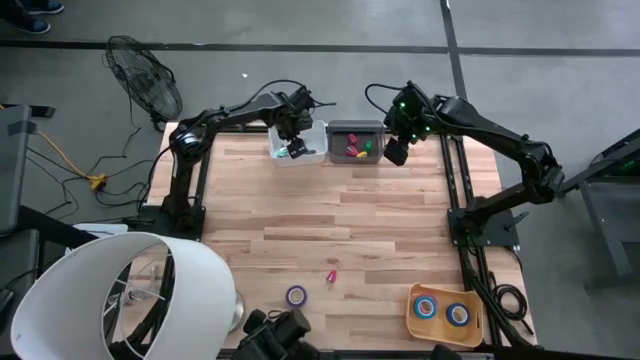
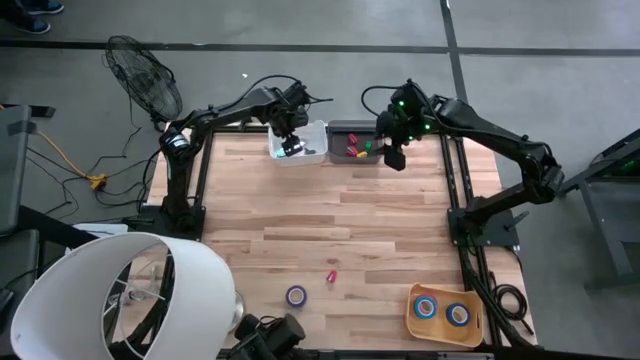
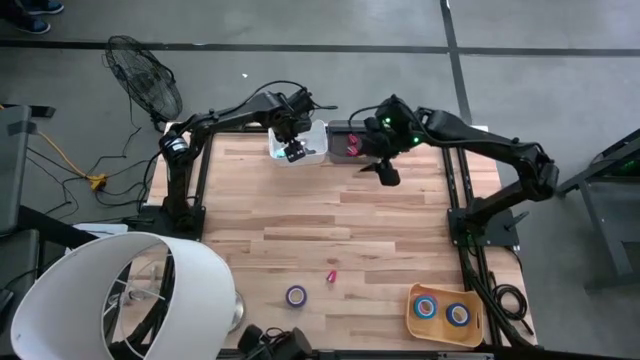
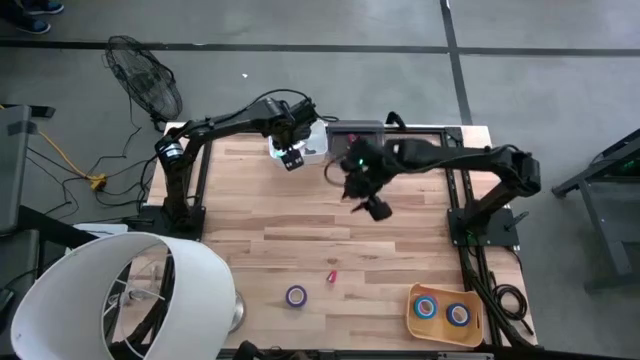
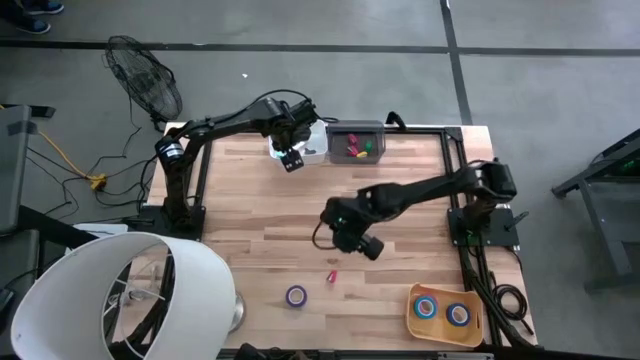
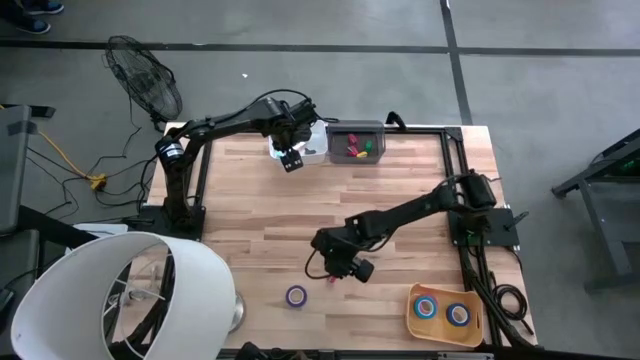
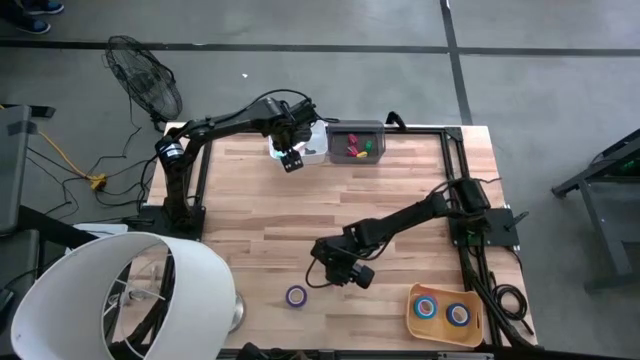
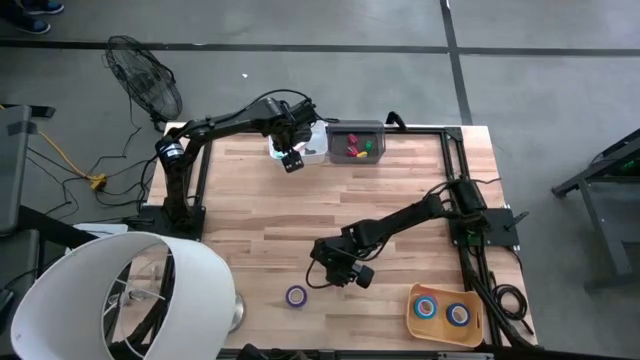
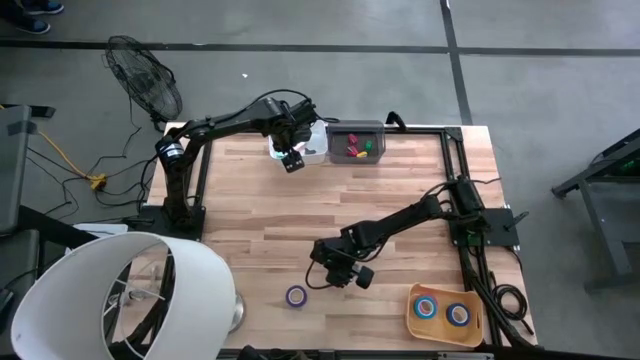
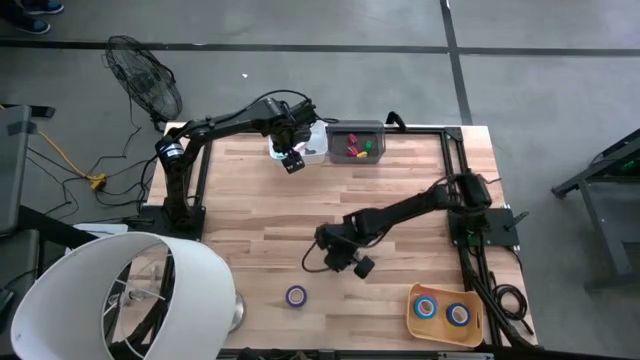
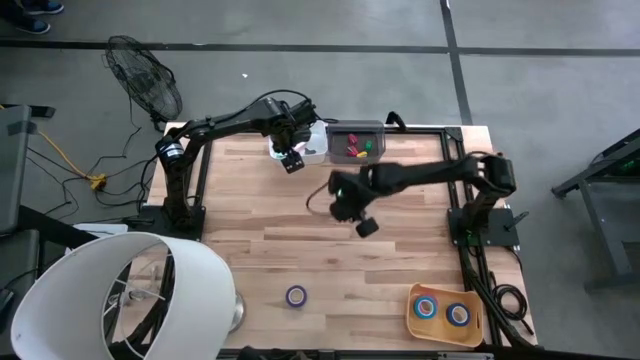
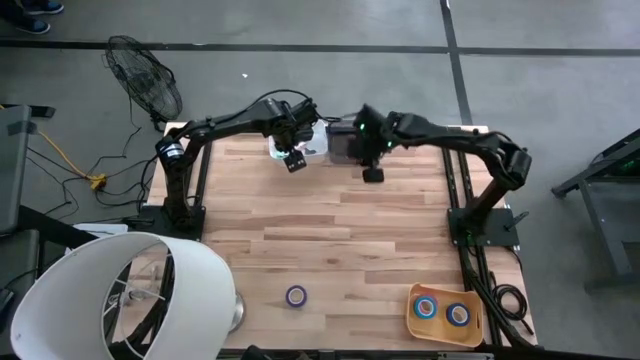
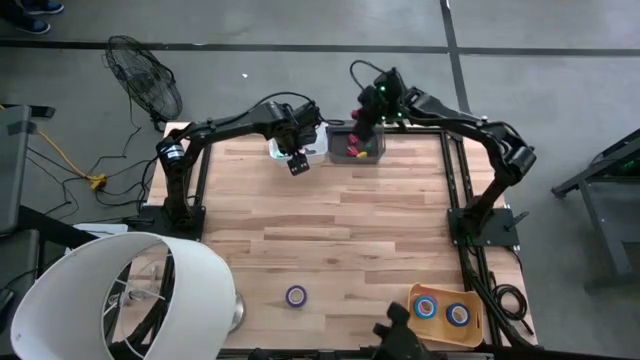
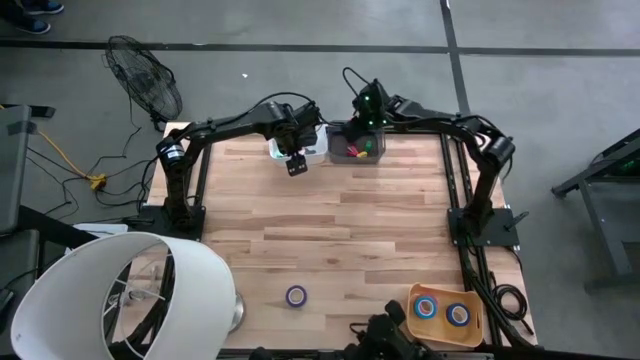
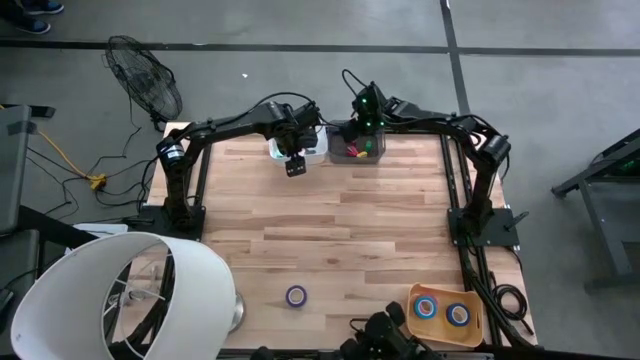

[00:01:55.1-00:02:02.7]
Task: Pick and place Stapler, Stapler remover, tape
Put the red stapler into the black bin

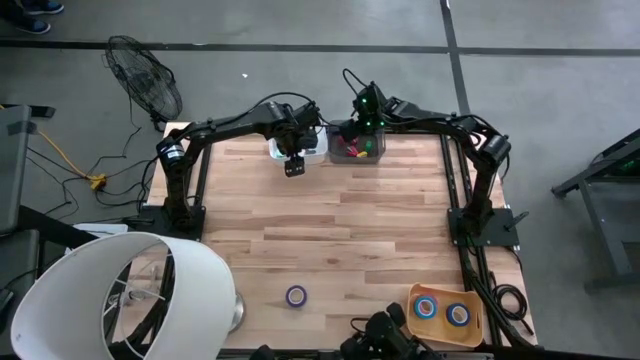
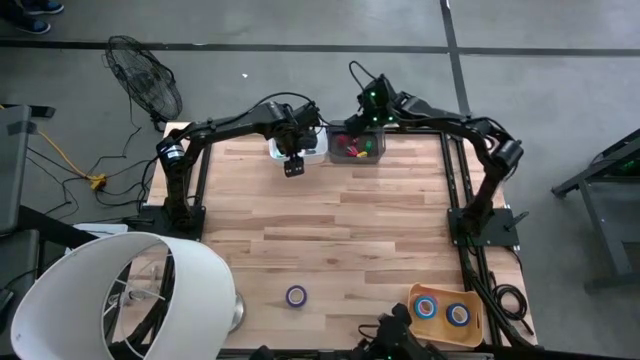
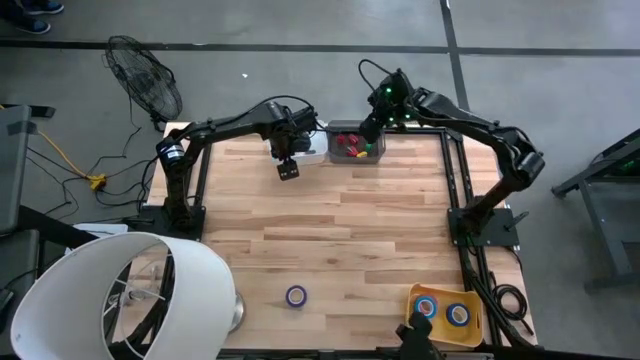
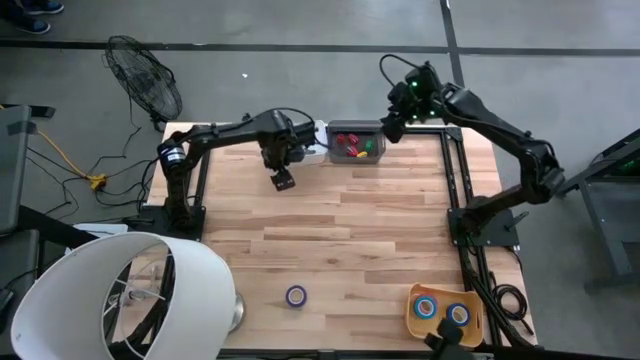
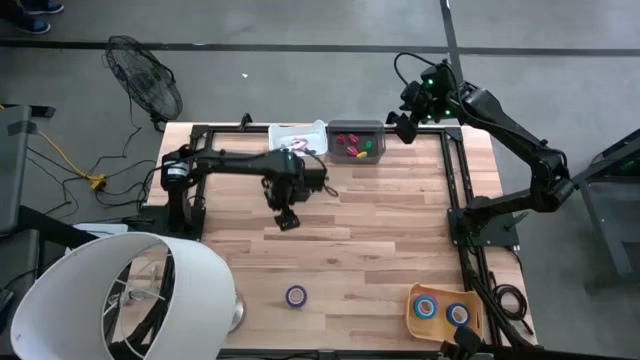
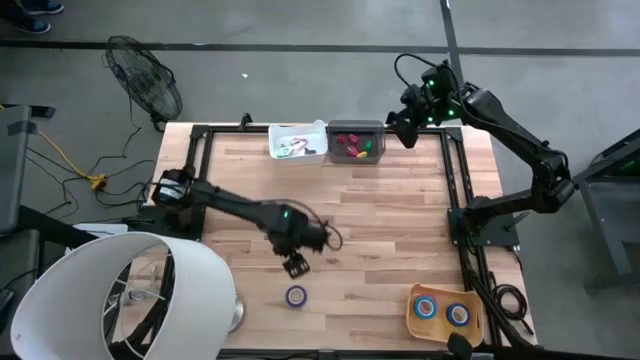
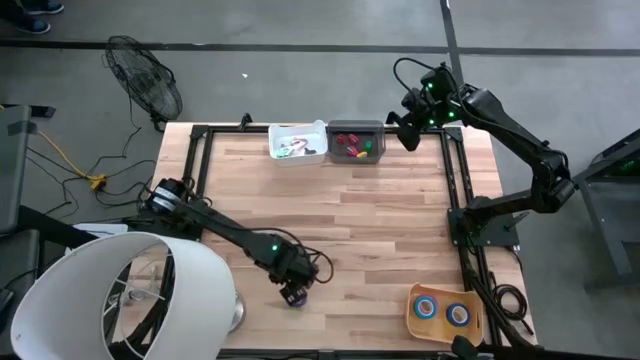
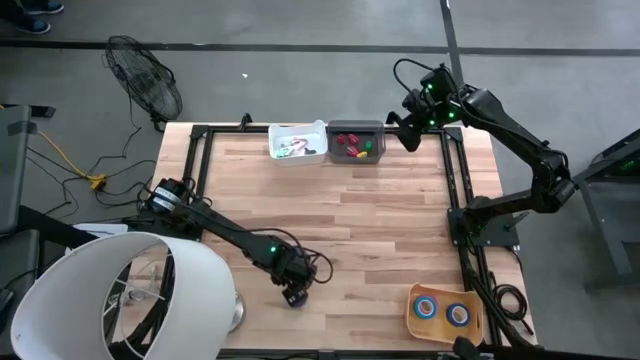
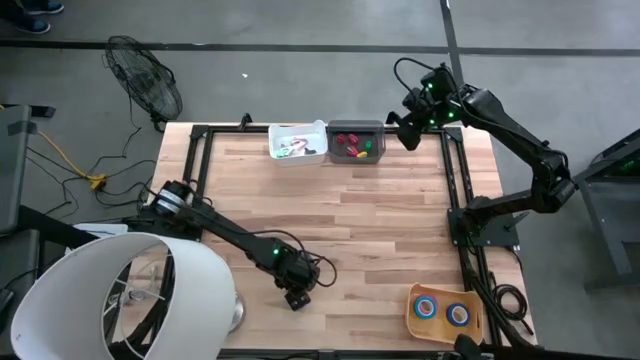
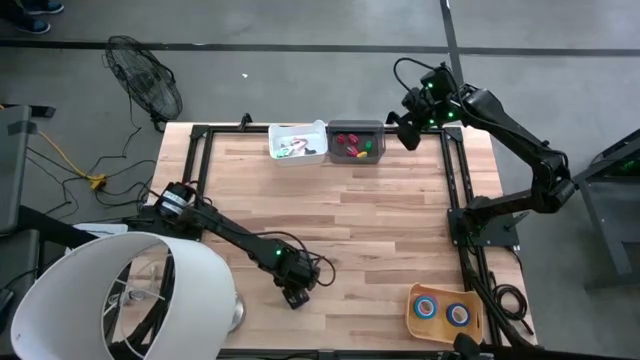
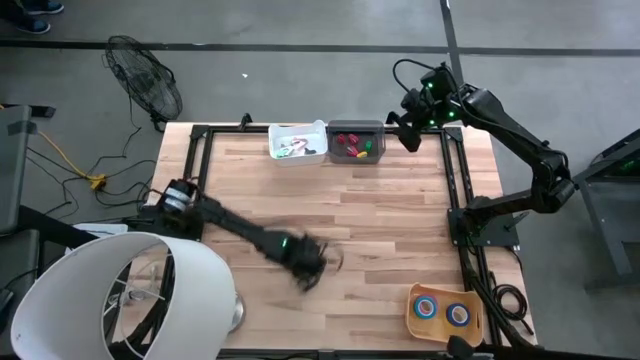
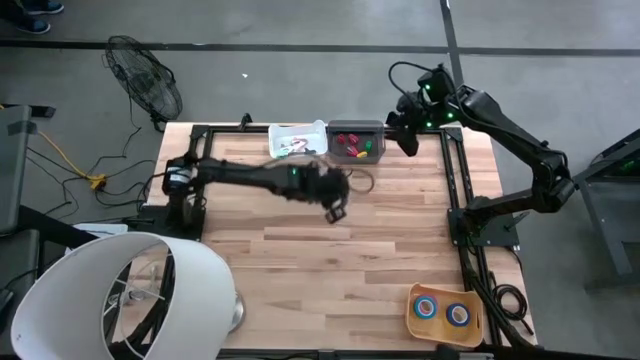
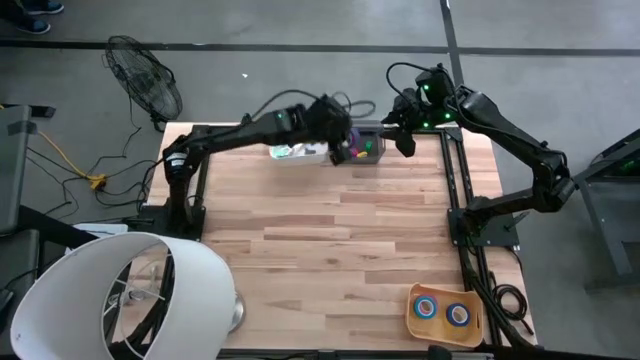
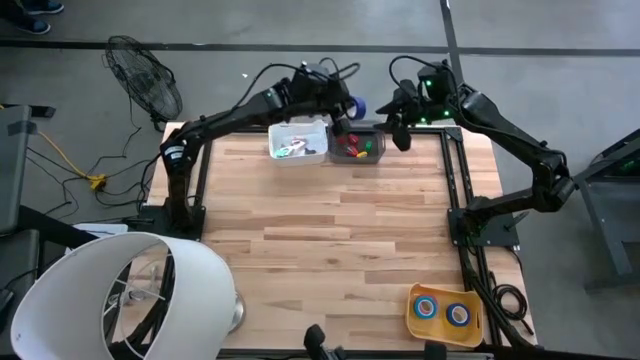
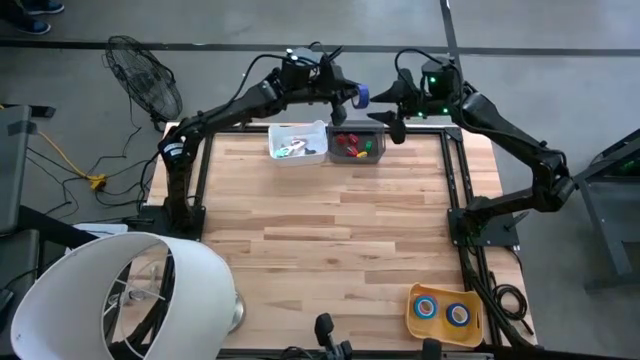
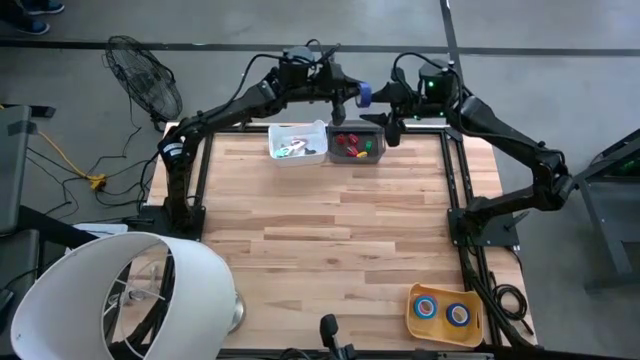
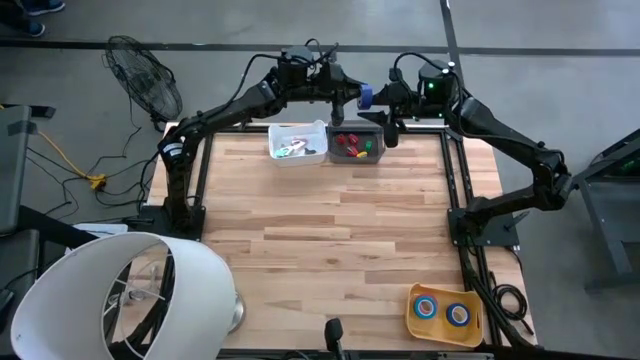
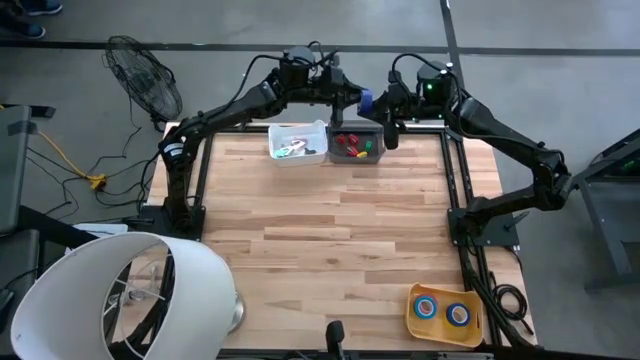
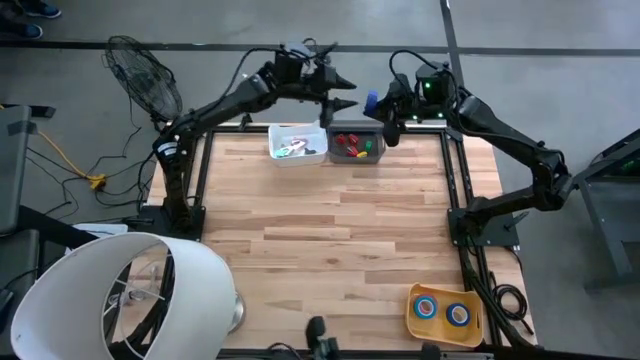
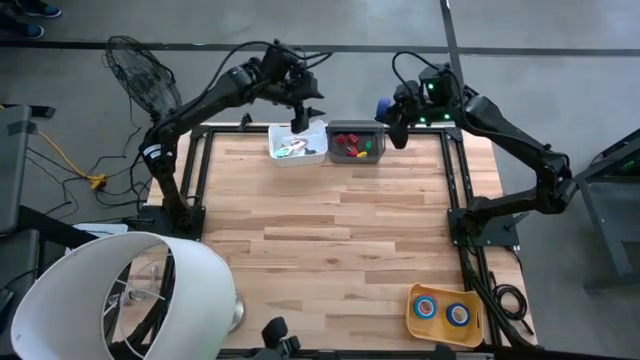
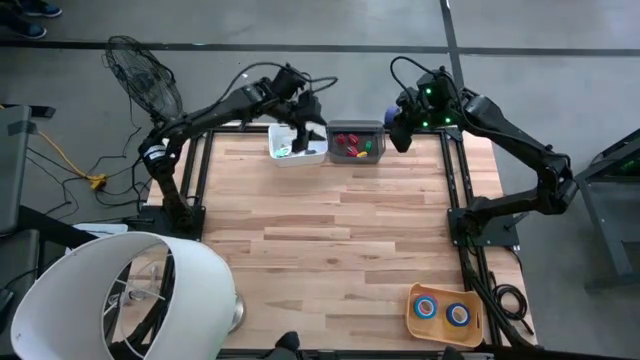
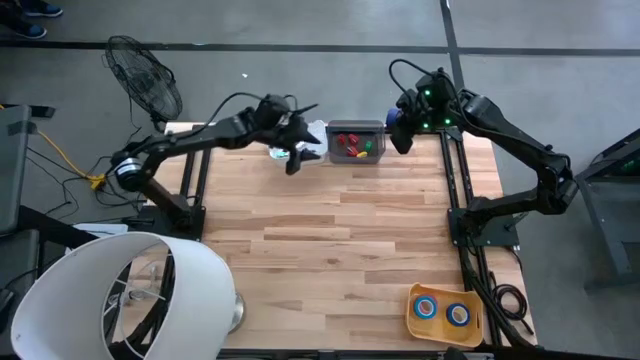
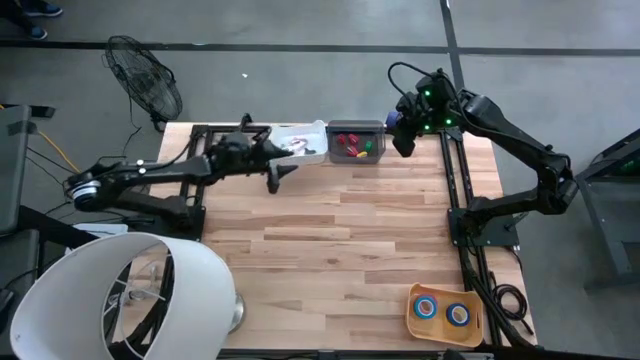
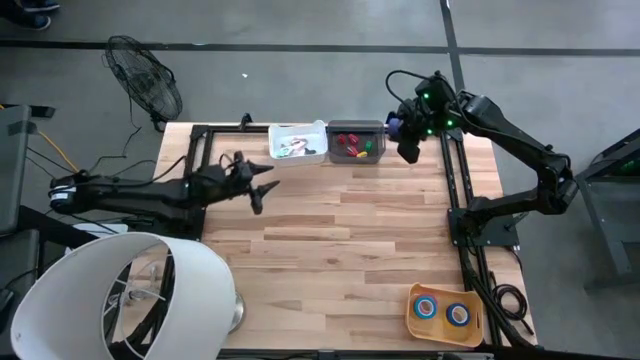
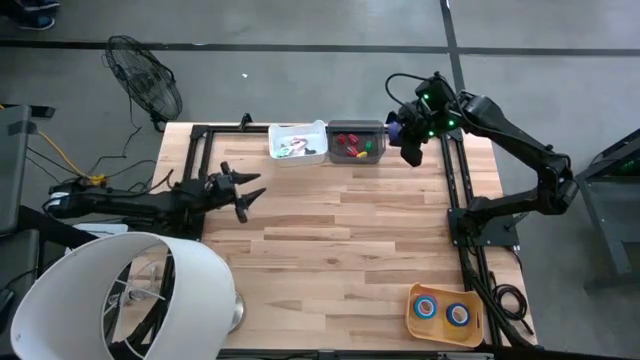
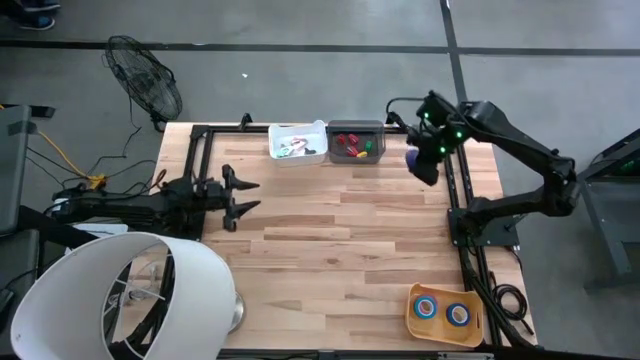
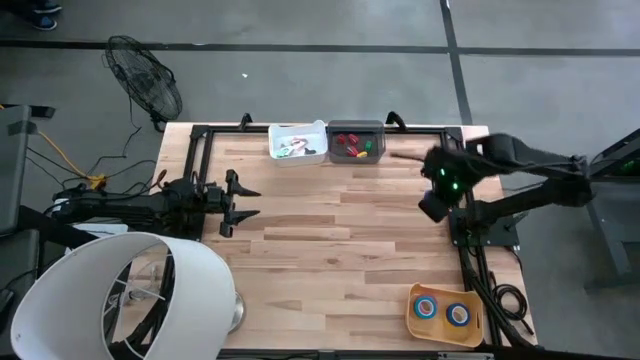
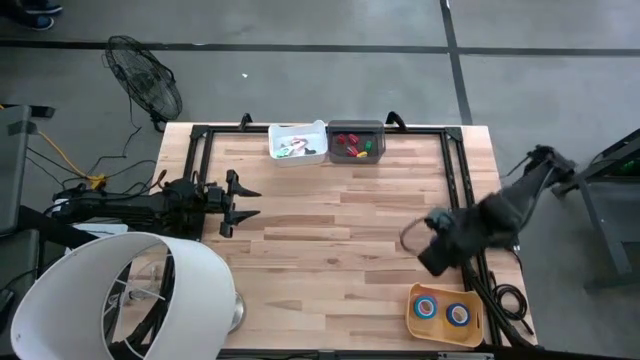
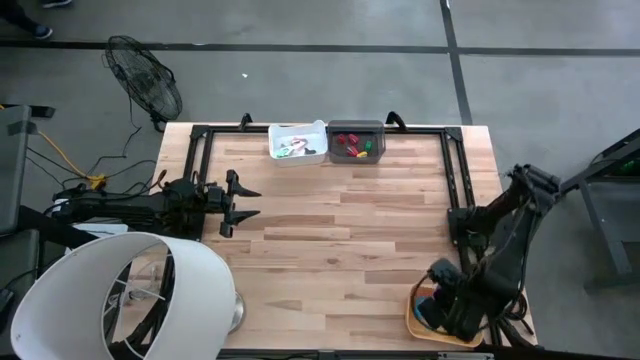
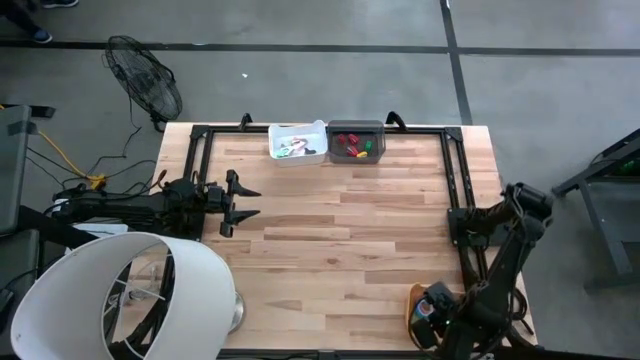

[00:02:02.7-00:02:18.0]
Put the dark blue tape into the yellow bin
